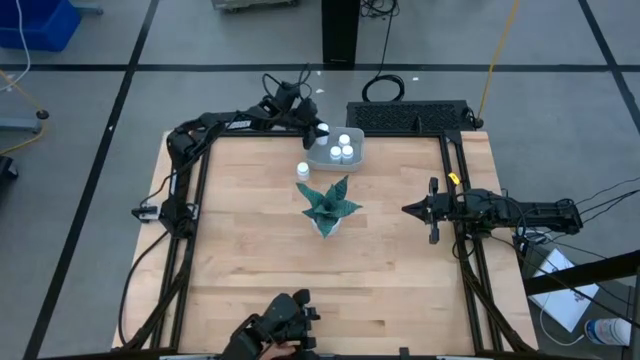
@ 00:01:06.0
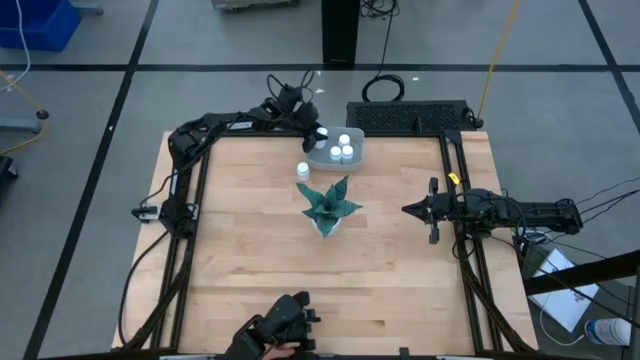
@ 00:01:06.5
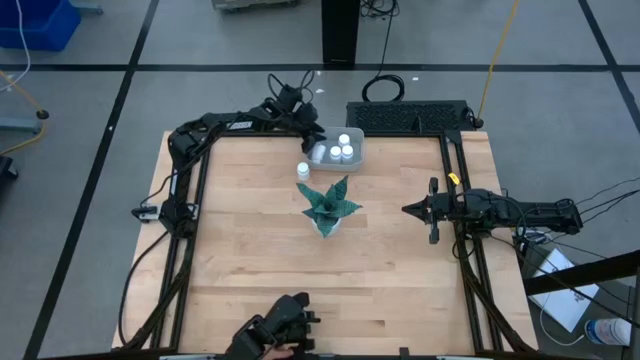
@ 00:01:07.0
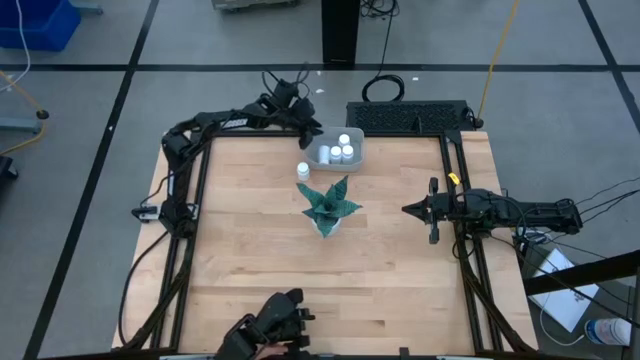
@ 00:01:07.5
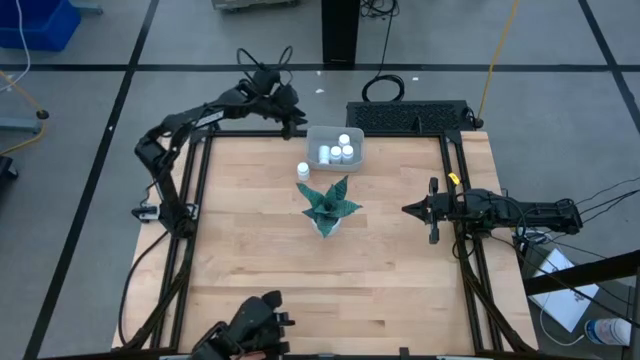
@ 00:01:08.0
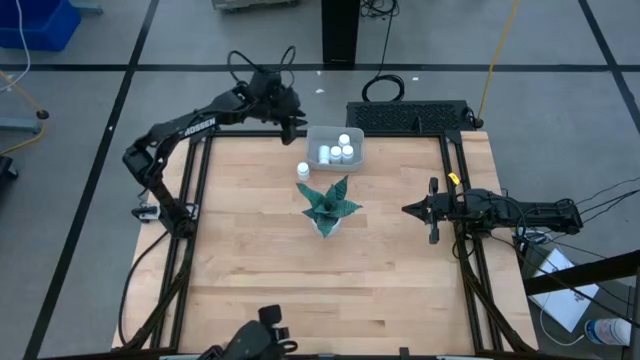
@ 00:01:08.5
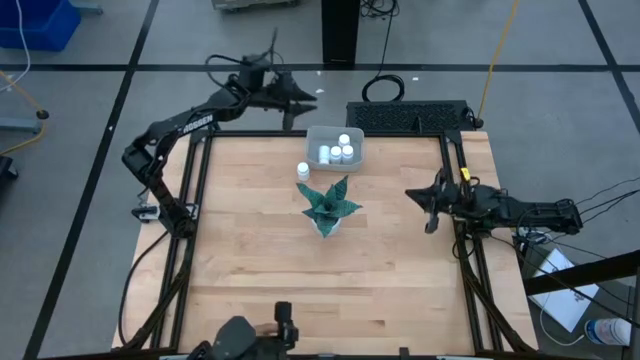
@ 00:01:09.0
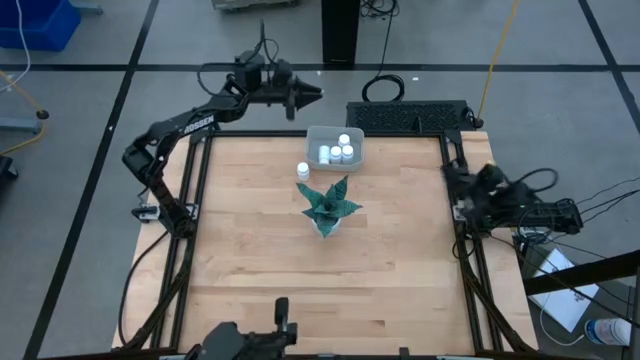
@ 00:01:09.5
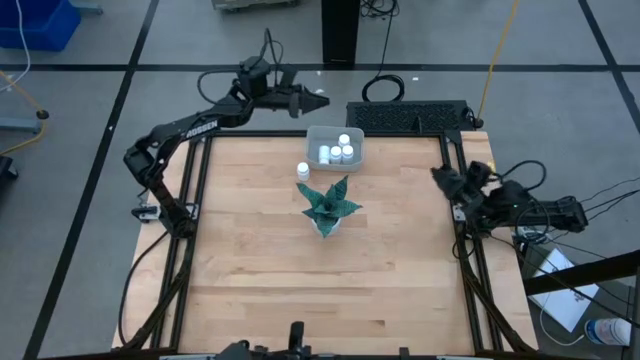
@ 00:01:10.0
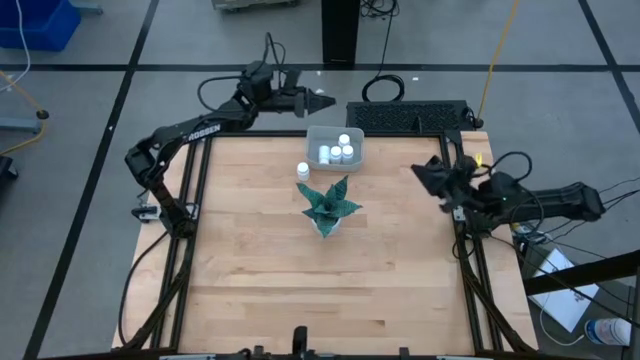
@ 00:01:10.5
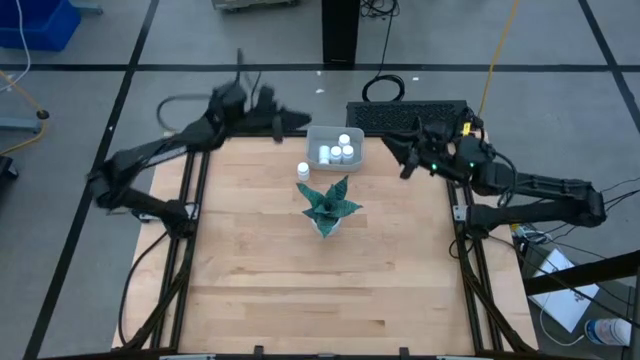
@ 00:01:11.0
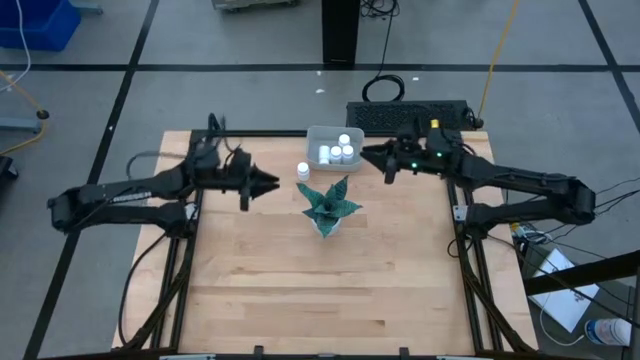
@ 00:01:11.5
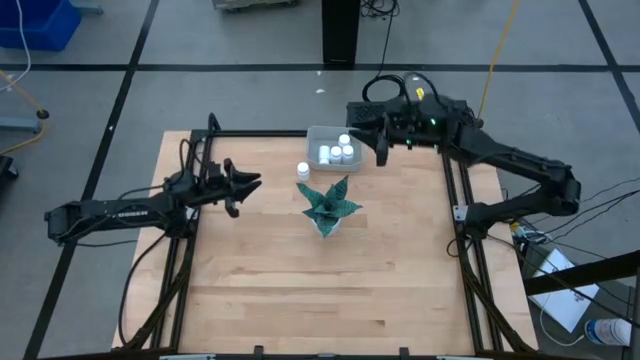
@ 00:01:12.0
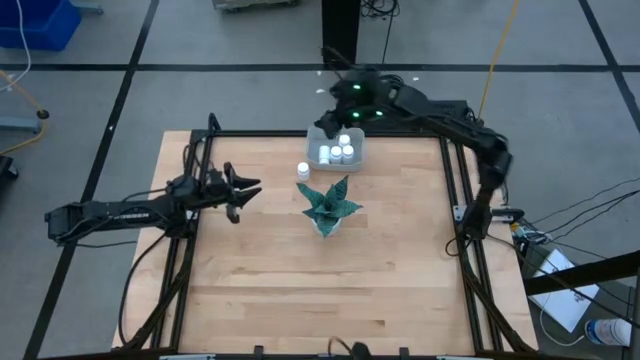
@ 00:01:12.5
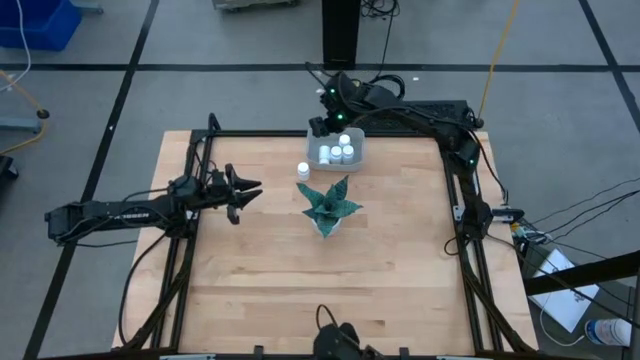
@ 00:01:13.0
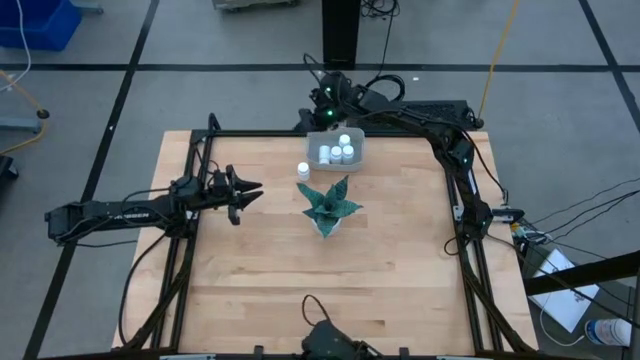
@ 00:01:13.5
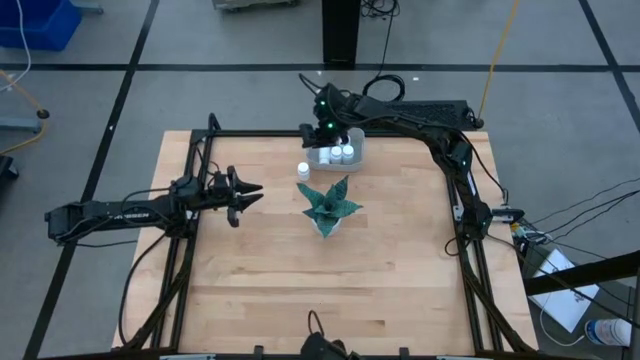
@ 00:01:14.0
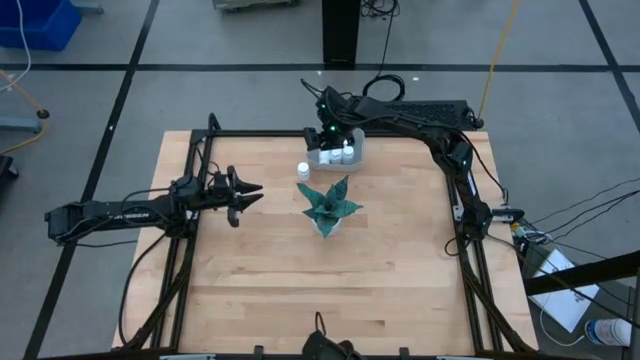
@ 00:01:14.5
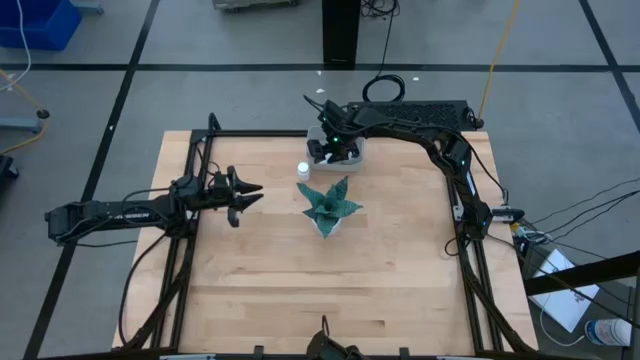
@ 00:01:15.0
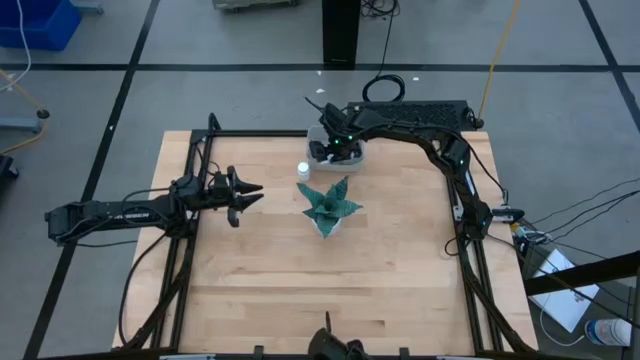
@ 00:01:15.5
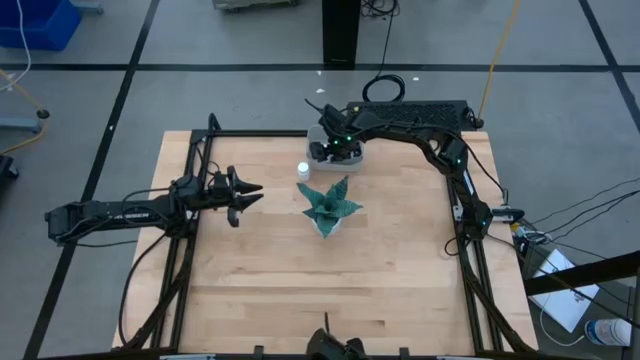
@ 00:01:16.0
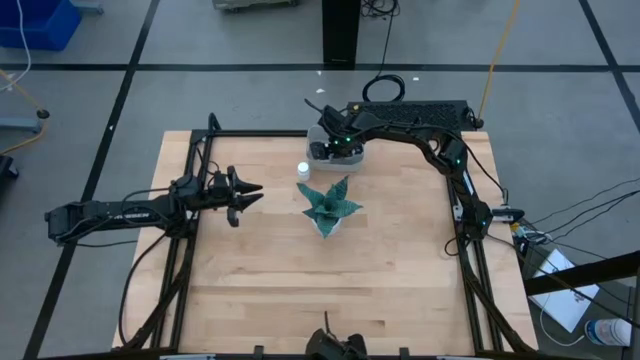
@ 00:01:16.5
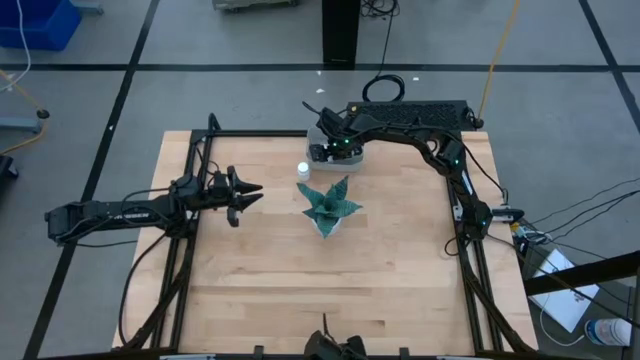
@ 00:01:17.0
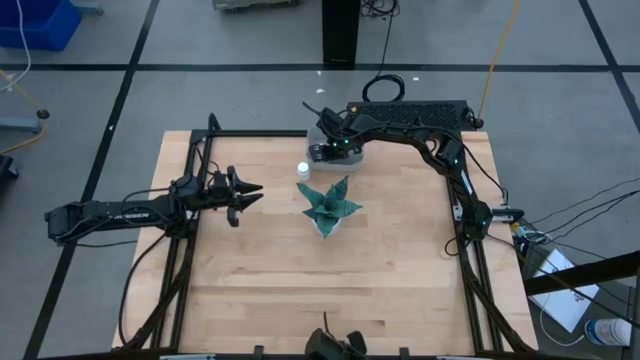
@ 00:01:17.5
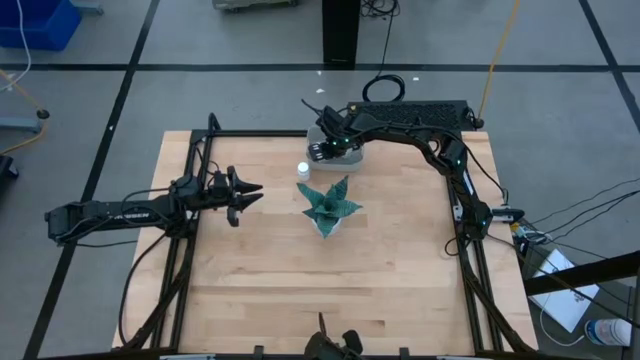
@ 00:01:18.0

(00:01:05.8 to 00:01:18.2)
Task: Pick and place pill bottles into a basket
Put the white medicine bottle into the gray bin

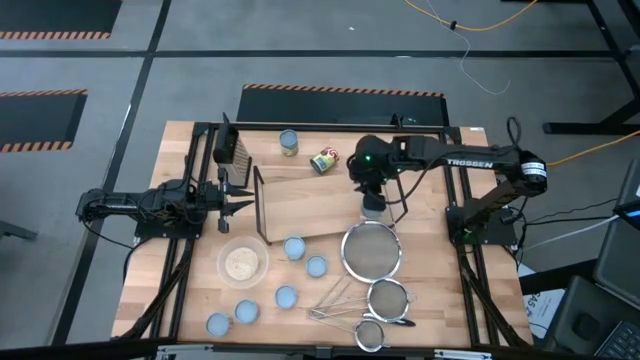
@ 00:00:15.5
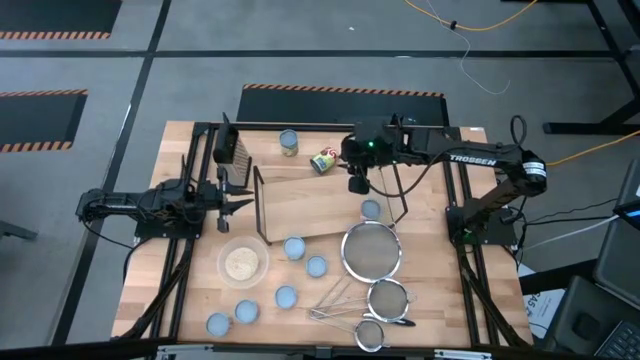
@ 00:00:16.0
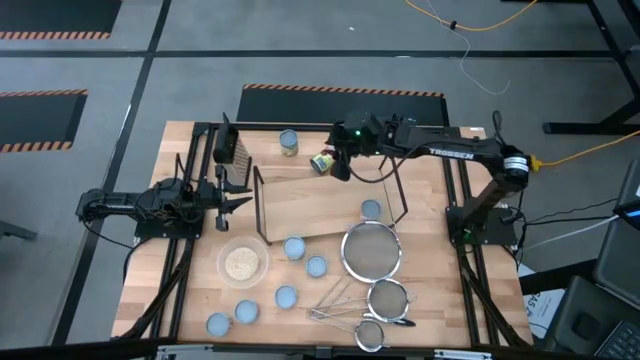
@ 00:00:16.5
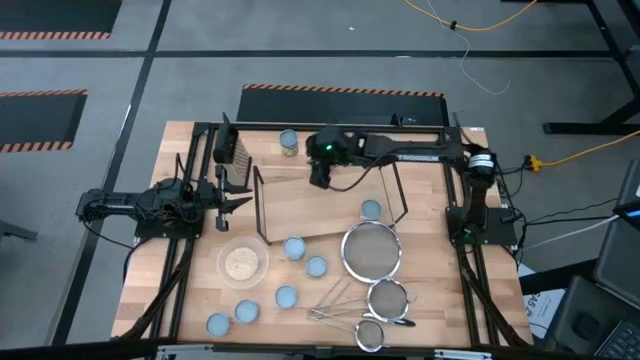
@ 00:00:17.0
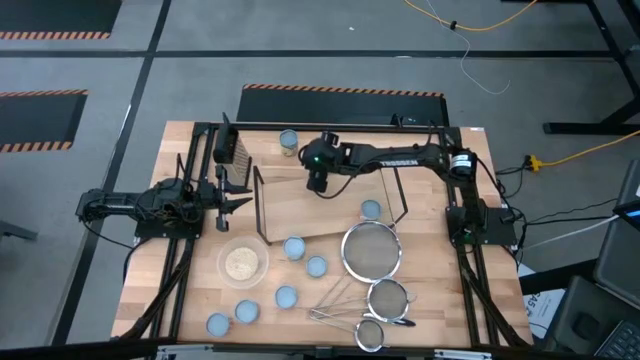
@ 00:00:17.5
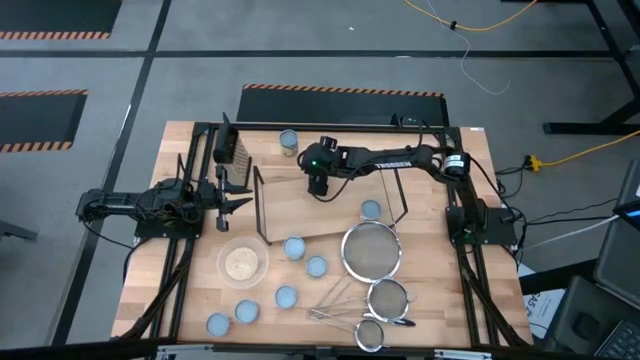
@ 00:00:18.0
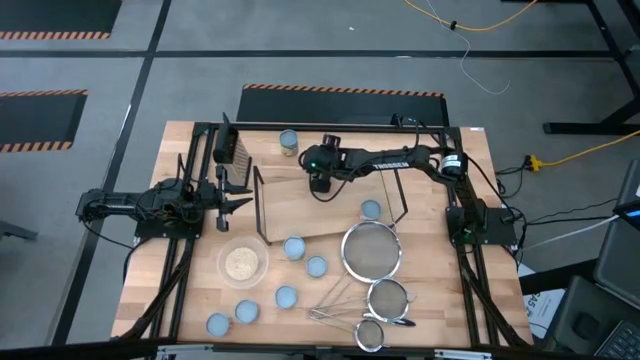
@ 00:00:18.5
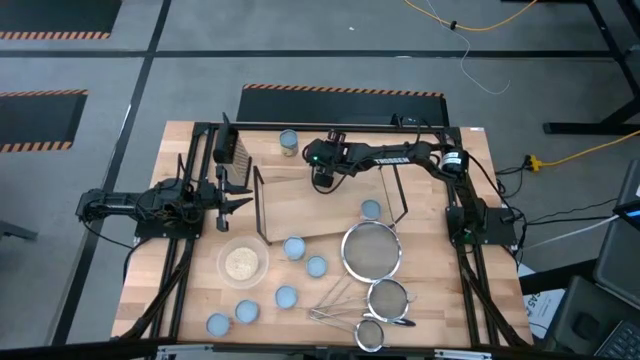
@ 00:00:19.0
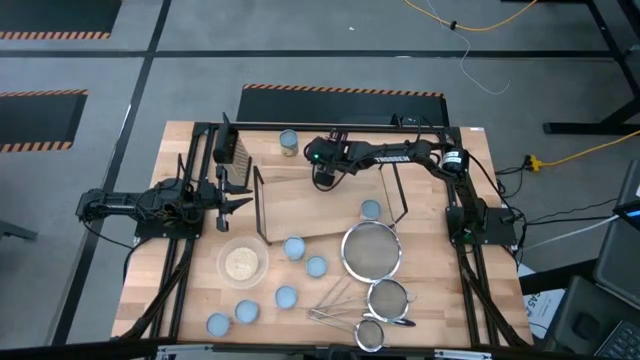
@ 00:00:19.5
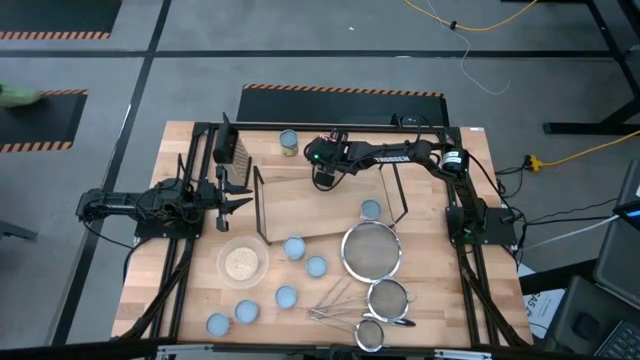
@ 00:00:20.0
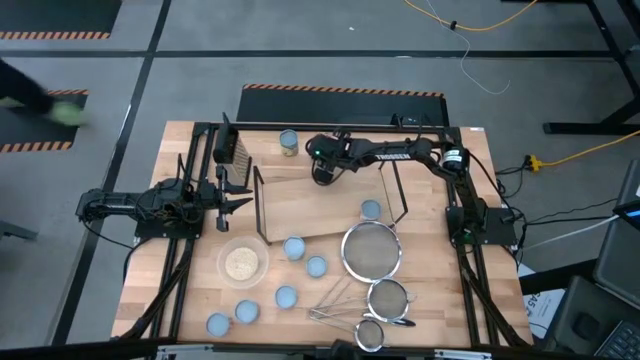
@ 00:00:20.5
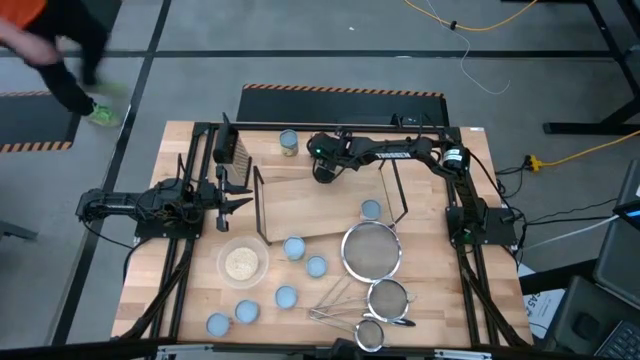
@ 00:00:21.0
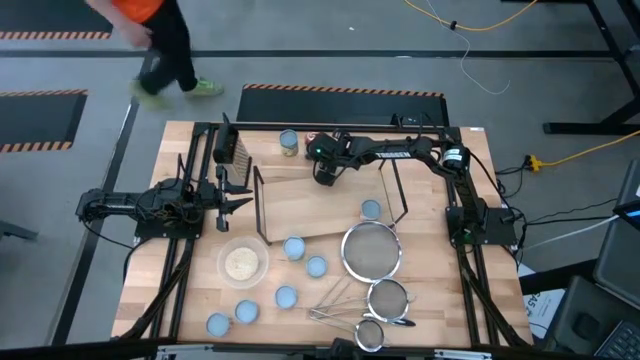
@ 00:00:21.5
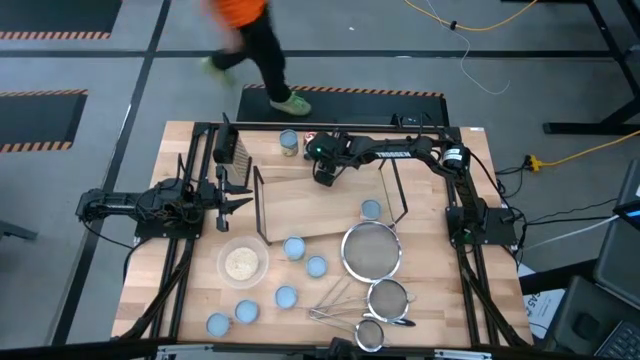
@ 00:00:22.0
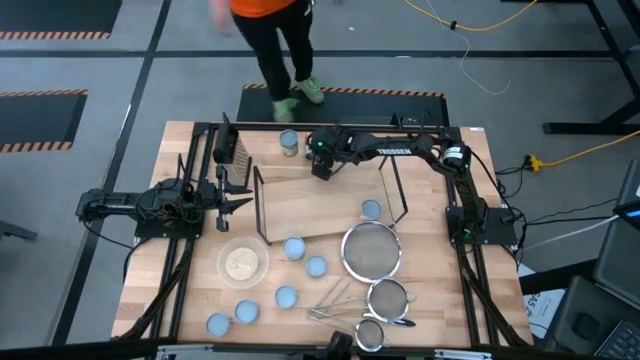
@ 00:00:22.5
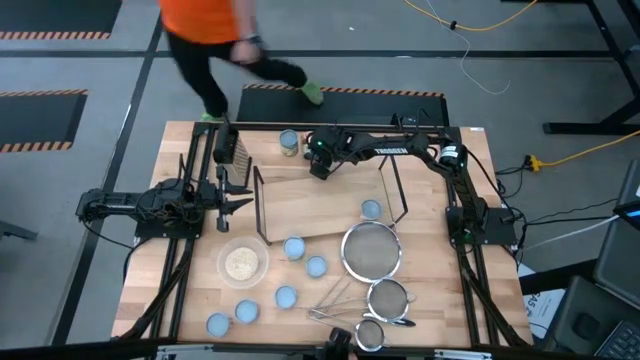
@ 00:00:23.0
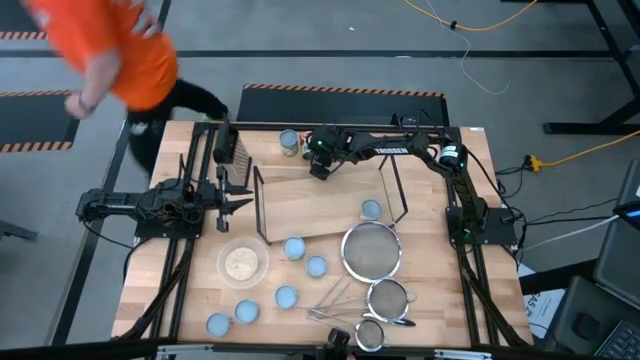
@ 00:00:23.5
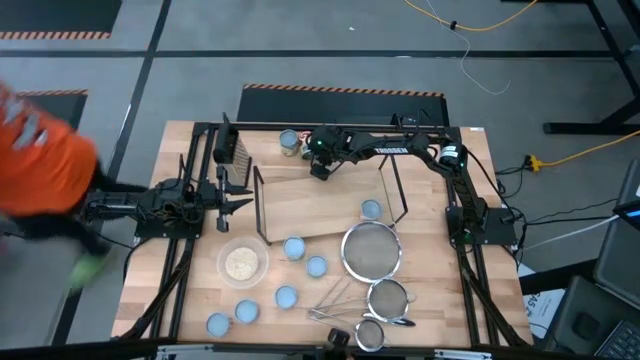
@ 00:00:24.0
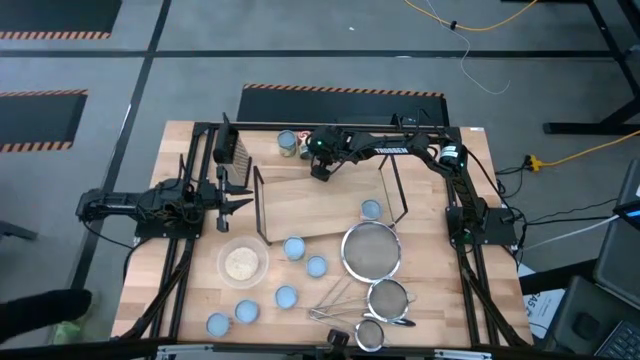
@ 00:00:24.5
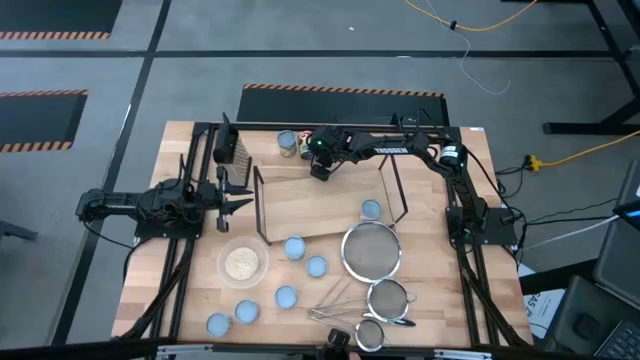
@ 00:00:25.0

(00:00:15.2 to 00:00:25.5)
Task: Pick and place cans onto a shelf
Put the large yellow can on the shelf
